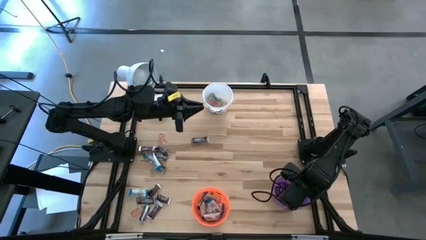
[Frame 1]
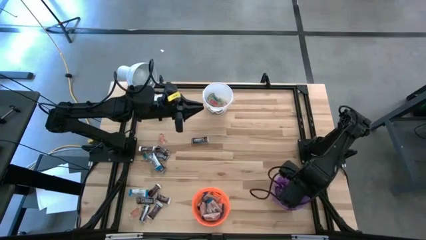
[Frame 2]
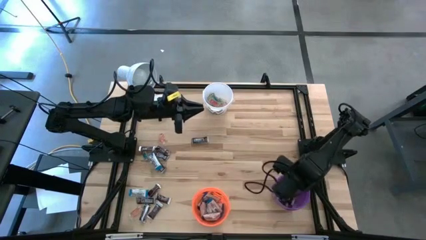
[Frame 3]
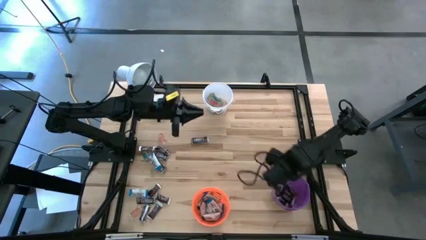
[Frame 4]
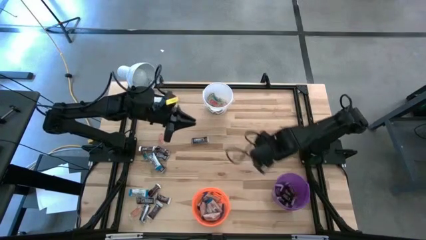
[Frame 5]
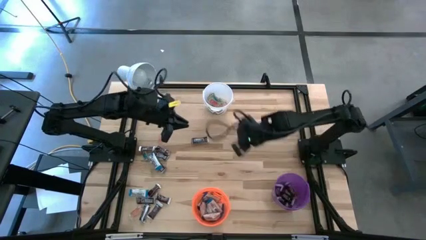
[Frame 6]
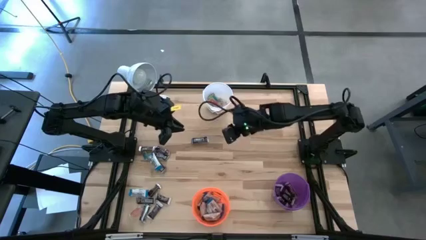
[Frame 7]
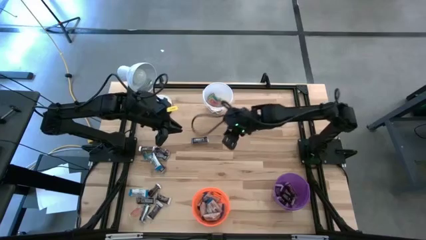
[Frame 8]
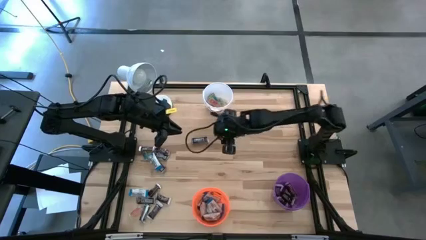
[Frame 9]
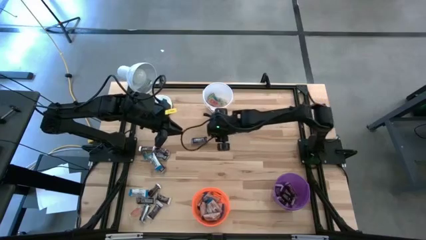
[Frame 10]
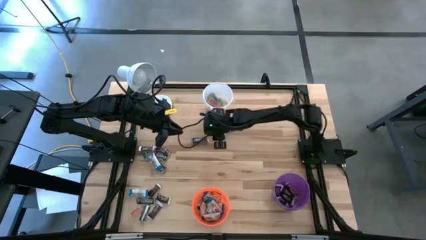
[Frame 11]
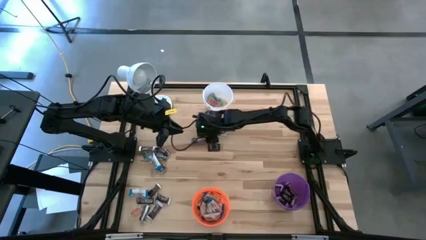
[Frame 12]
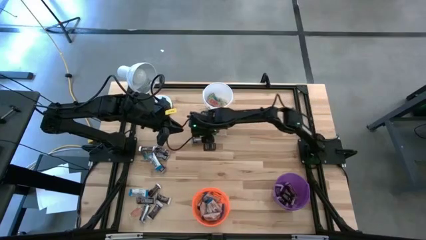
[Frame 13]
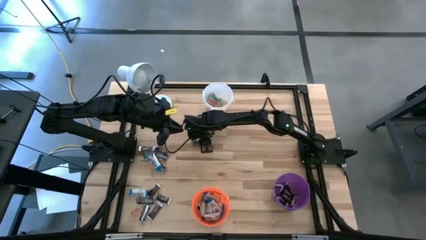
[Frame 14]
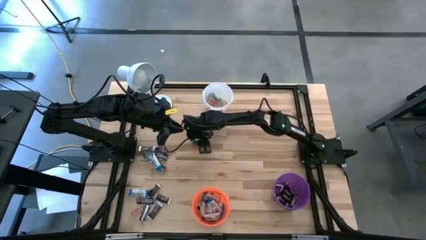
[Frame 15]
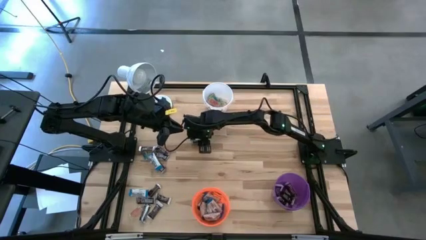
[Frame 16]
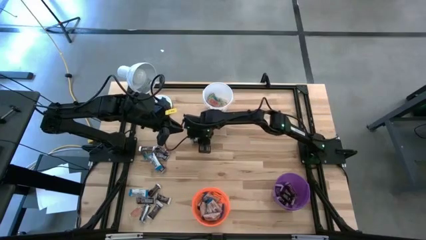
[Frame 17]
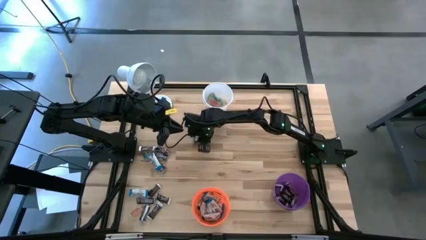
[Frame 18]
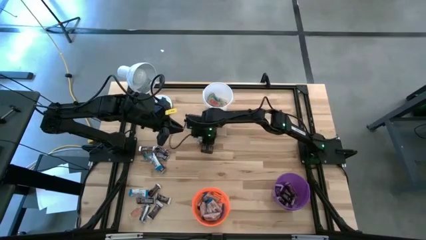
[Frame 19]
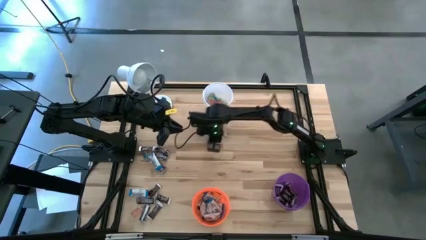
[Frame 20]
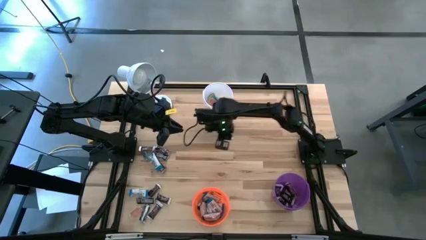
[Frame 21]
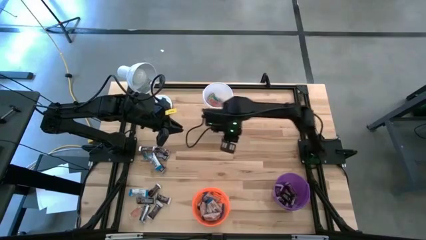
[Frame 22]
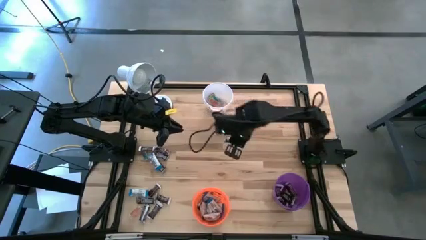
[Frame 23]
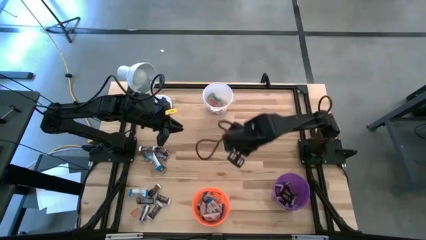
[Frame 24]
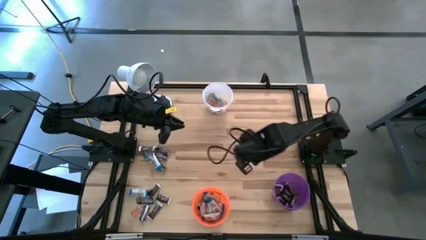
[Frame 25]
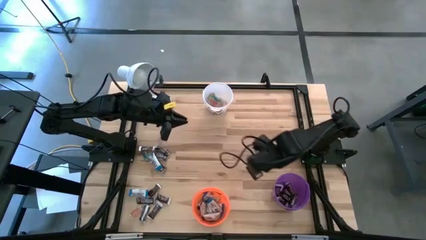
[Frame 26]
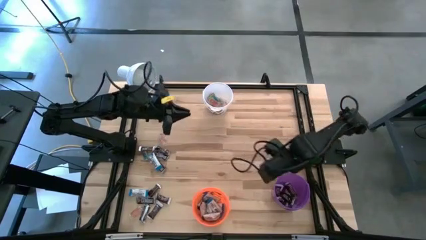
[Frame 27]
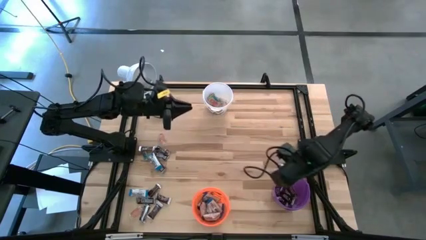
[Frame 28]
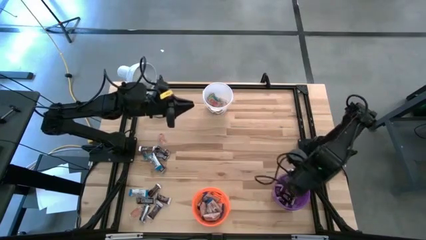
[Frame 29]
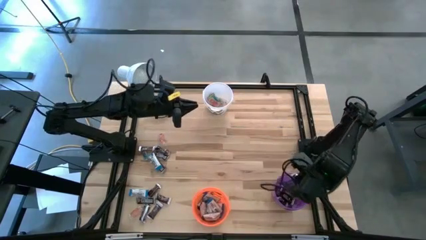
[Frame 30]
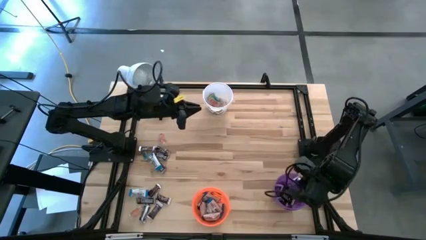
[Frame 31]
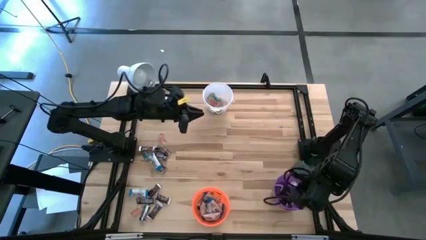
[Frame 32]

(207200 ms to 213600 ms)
Task: Organize candy in baskets
Put the dark brown chocolate bar into the dark purple bucket

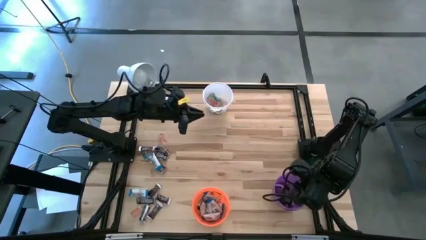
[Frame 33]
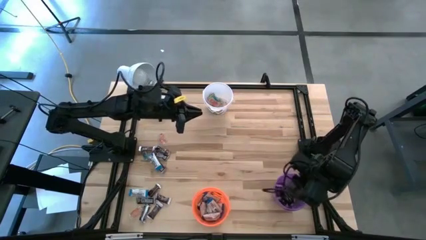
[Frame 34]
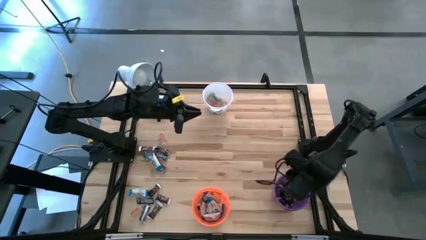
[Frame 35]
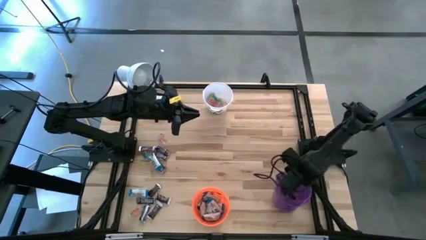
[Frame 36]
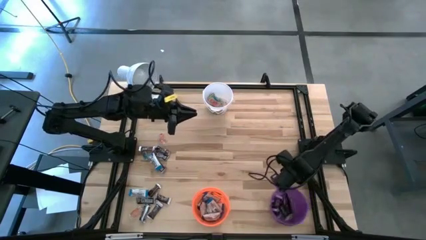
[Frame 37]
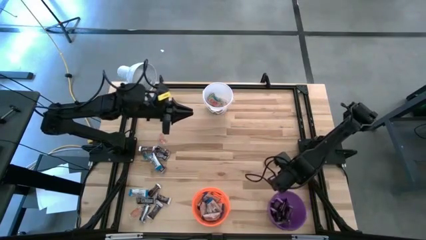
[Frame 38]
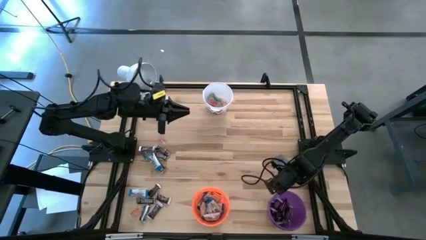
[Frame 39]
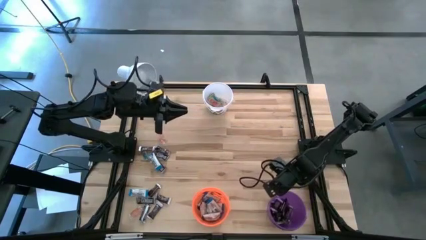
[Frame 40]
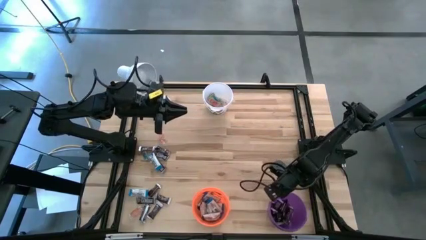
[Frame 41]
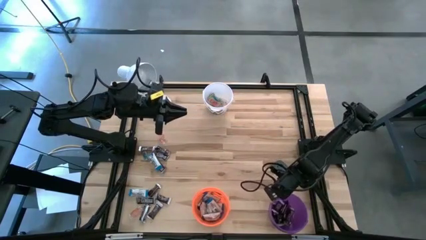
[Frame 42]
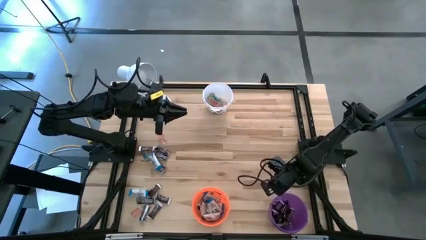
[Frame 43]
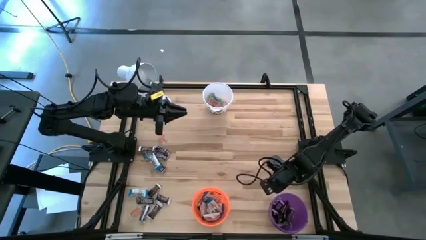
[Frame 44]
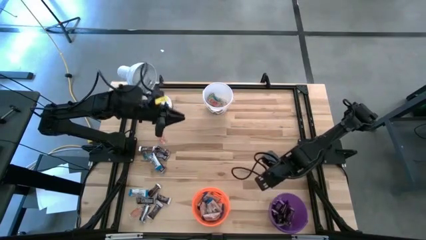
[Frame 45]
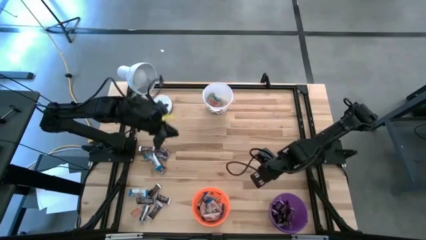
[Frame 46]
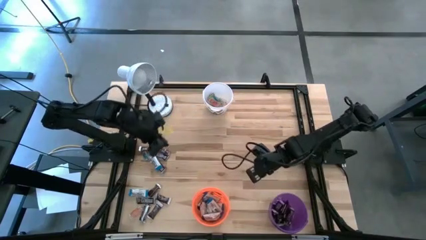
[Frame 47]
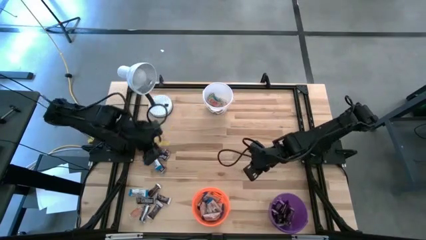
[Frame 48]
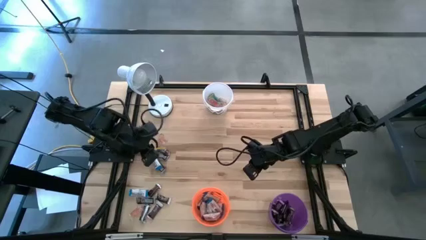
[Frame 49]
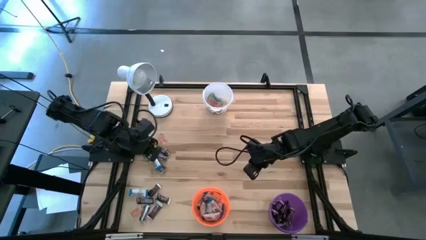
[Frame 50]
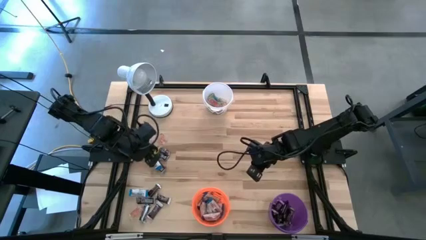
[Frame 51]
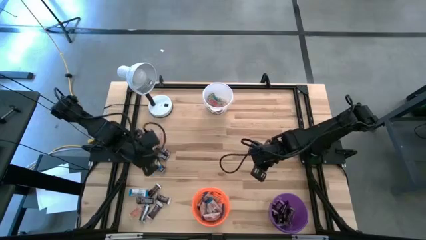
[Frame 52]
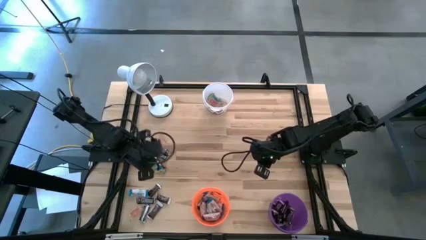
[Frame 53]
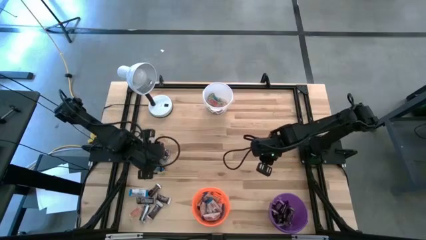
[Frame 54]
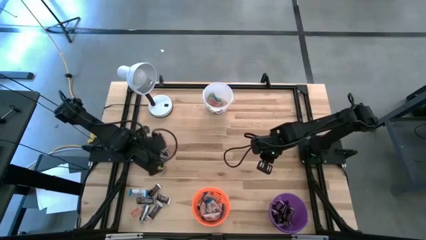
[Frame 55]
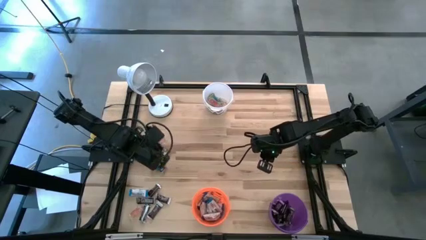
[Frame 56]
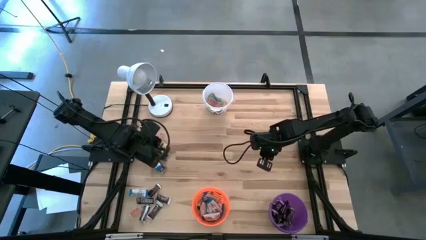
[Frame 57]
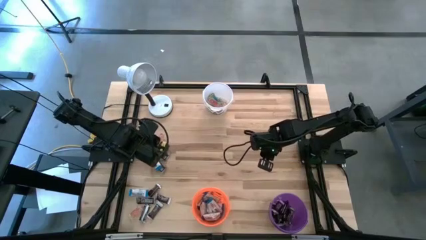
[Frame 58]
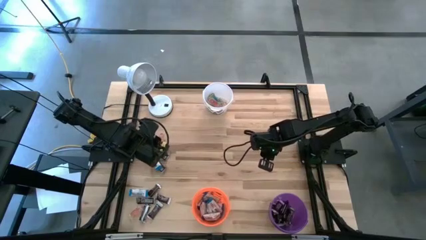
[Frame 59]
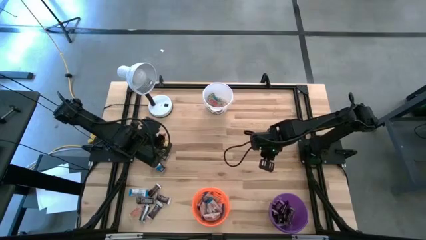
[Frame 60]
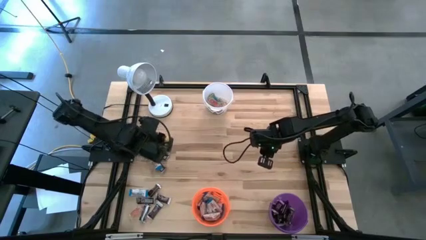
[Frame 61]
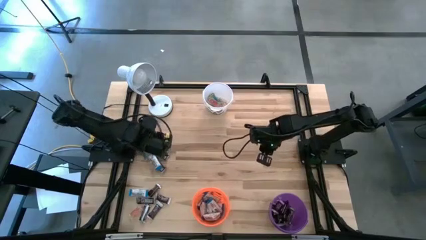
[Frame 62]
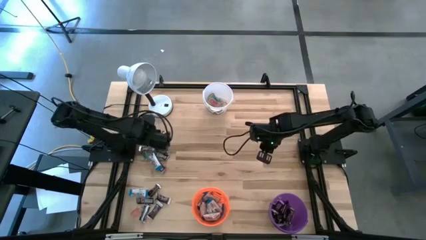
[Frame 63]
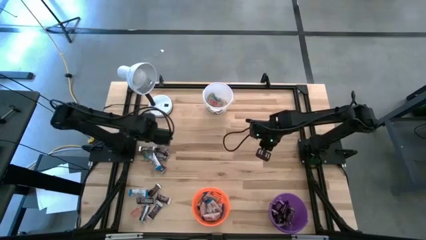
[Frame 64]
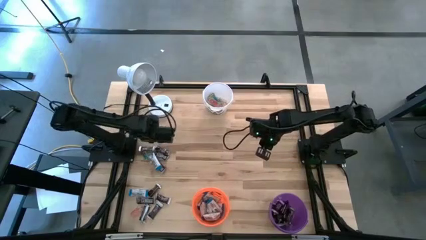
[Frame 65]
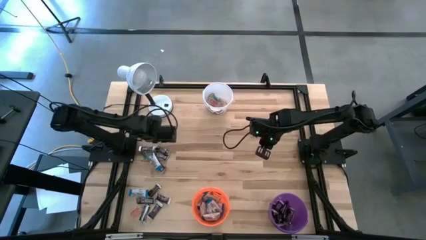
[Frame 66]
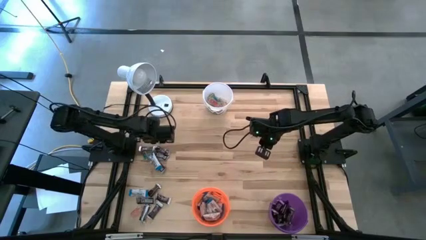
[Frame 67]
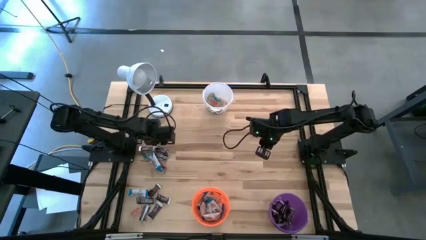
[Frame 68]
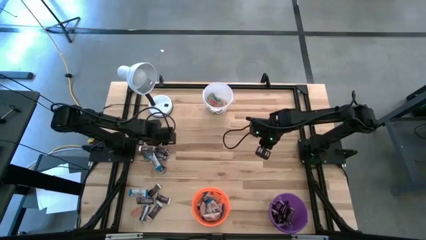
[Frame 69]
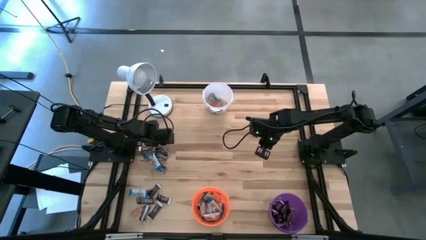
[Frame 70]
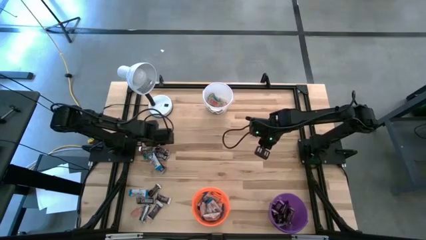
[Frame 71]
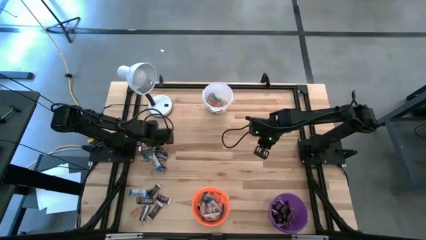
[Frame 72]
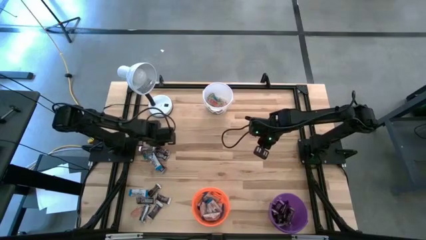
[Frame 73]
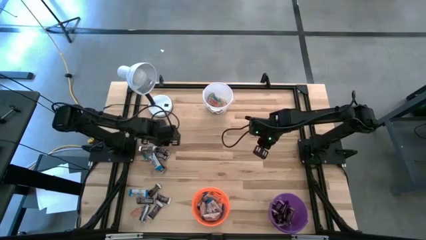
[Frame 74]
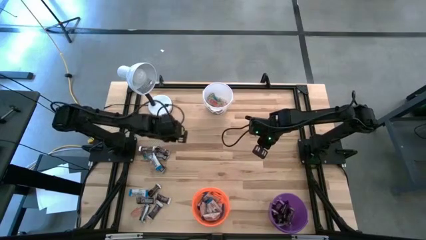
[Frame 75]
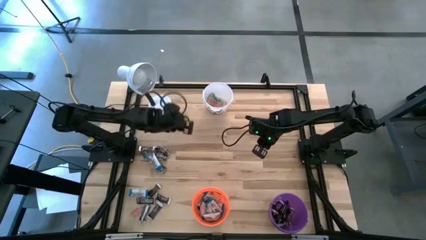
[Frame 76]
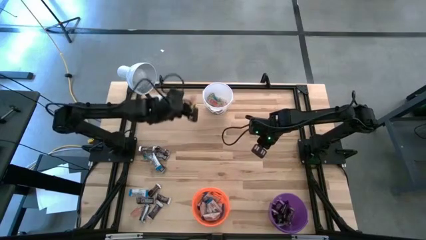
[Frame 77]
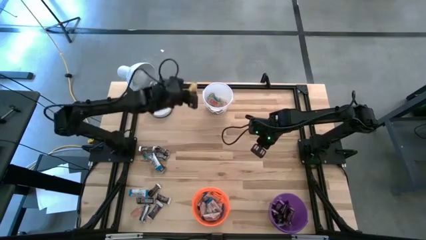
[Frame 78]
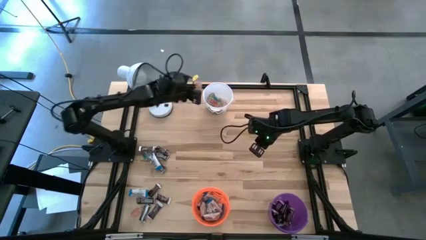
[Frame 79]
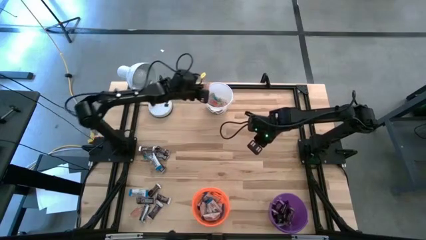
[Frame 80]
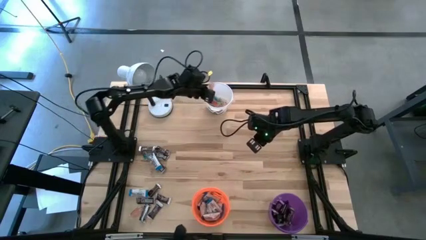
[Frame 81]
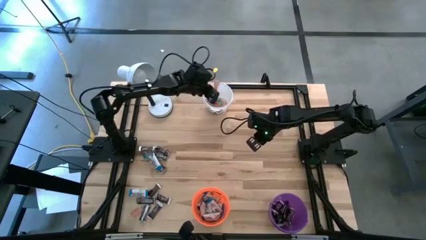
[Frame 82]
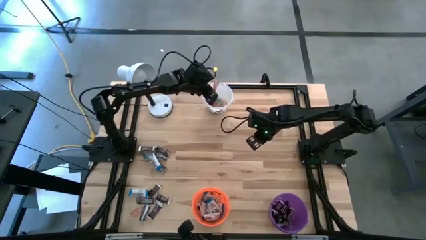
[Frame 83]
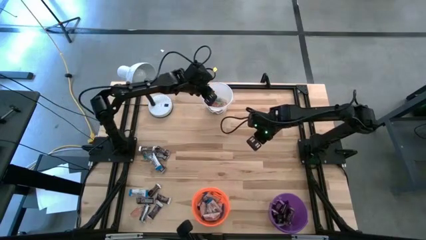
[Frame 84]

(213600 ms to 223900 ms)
Put the orange gummy into the white bucket
